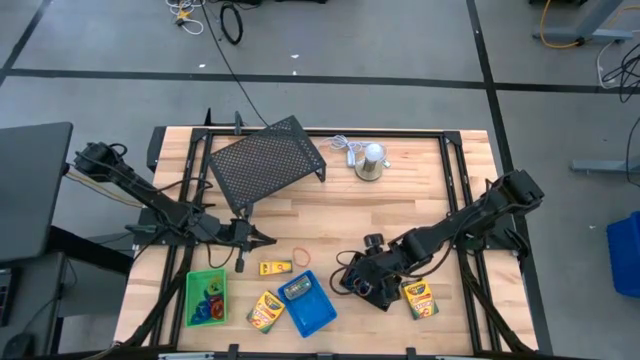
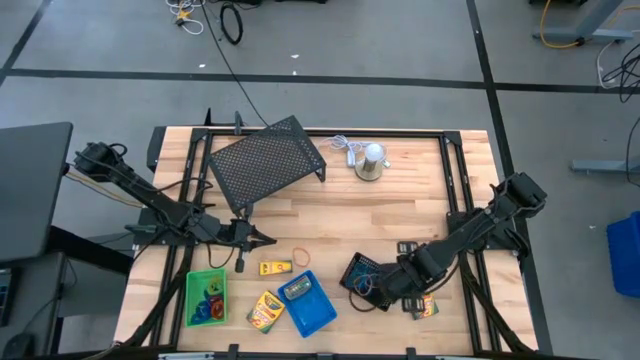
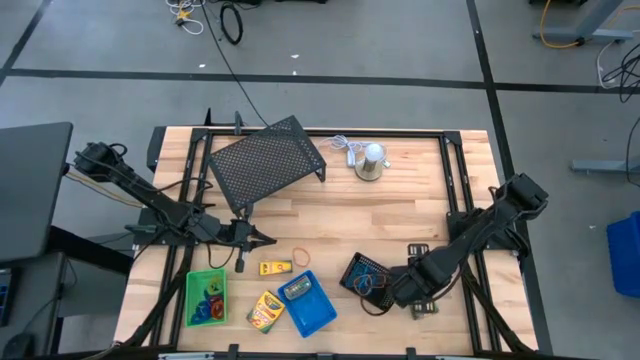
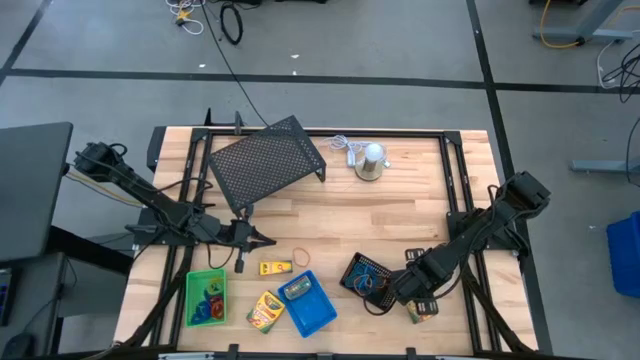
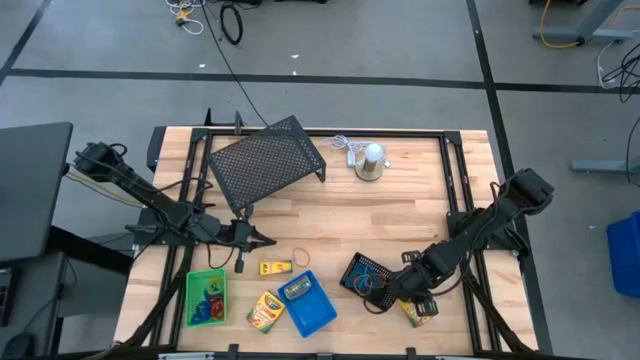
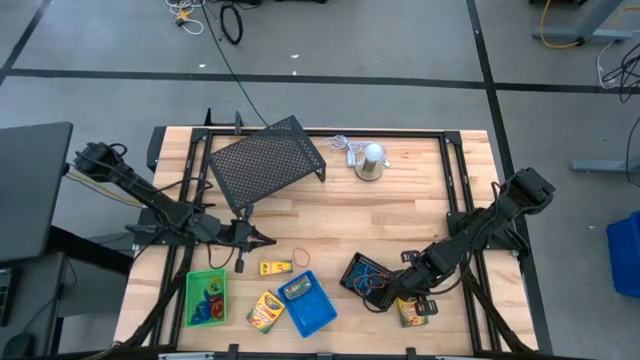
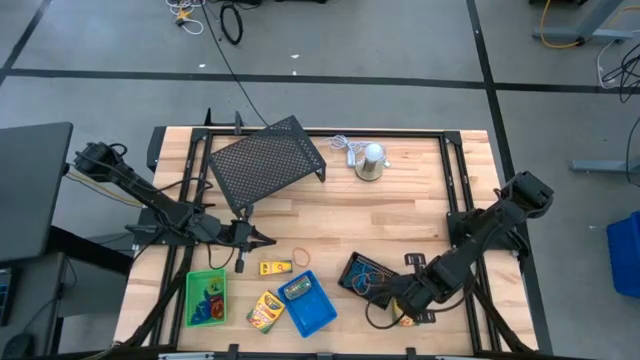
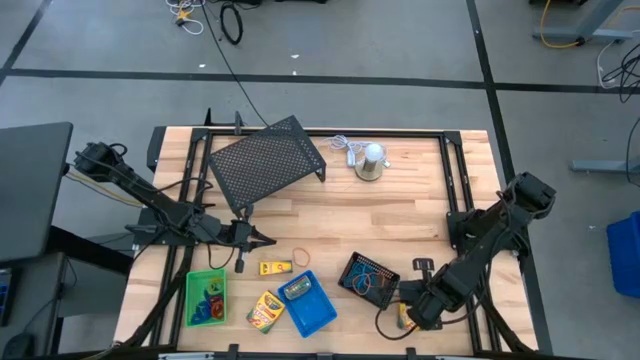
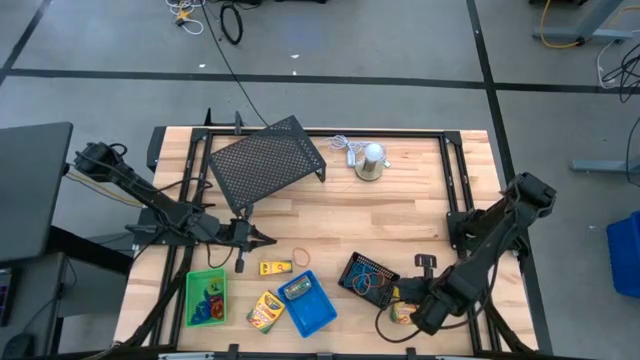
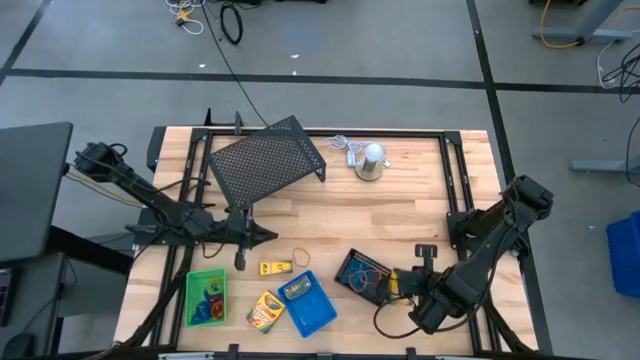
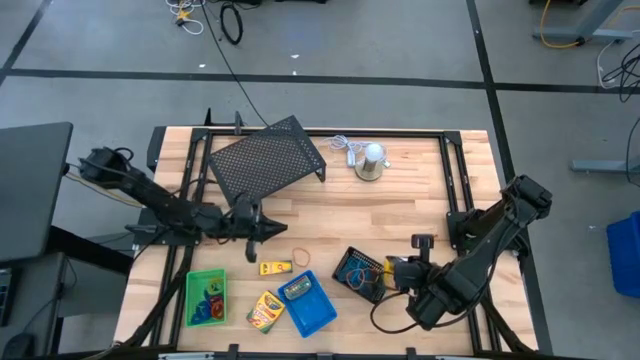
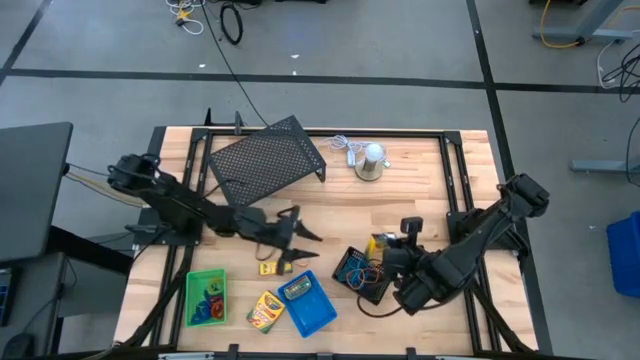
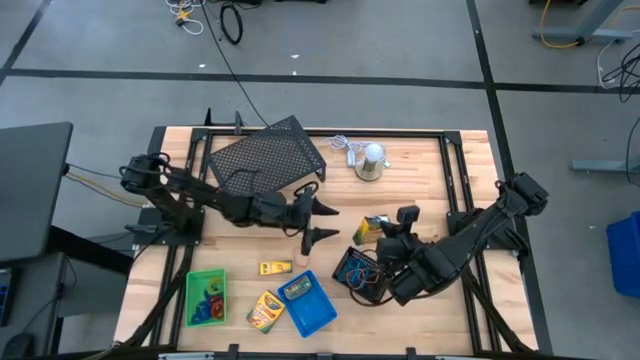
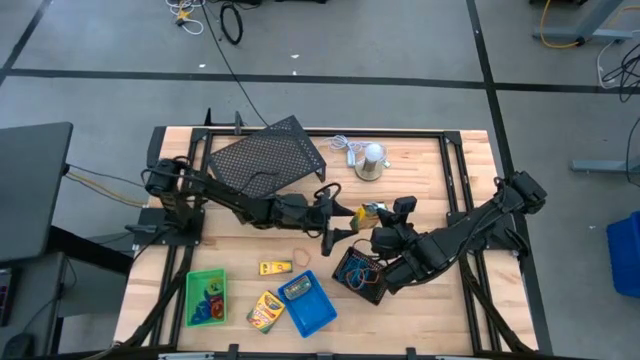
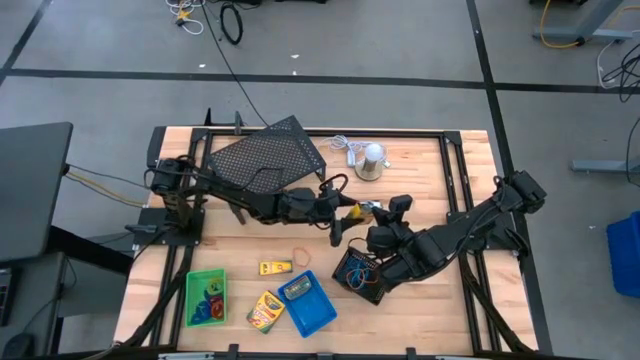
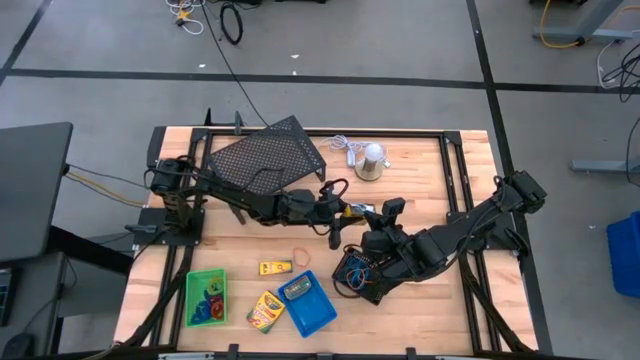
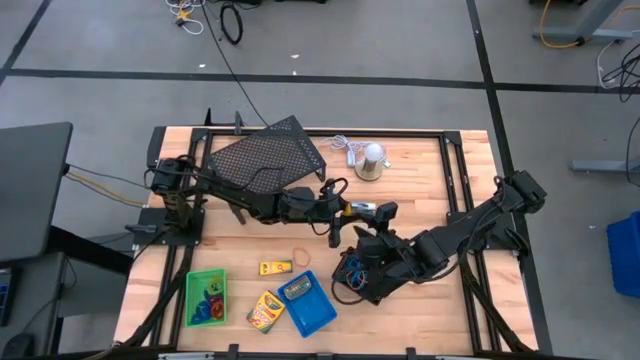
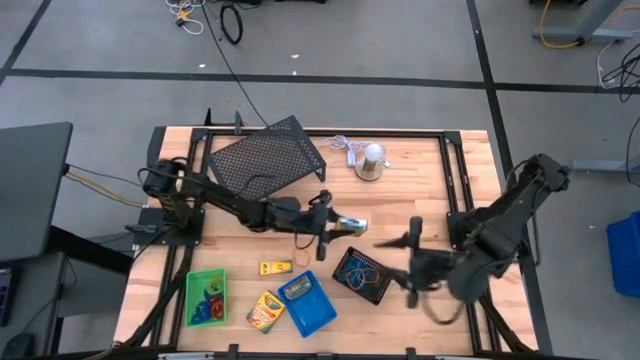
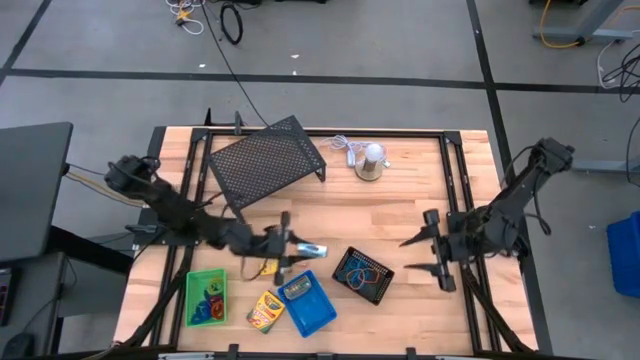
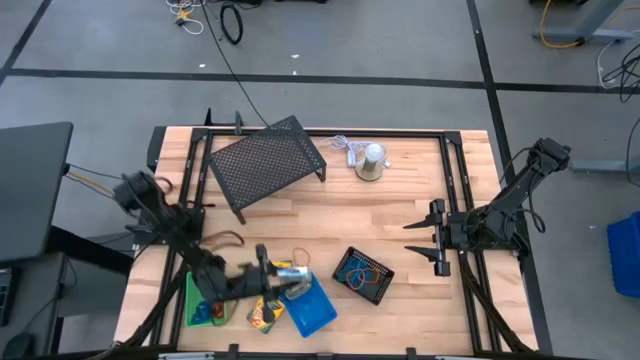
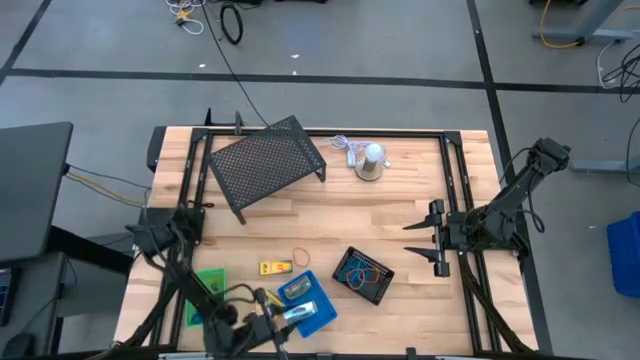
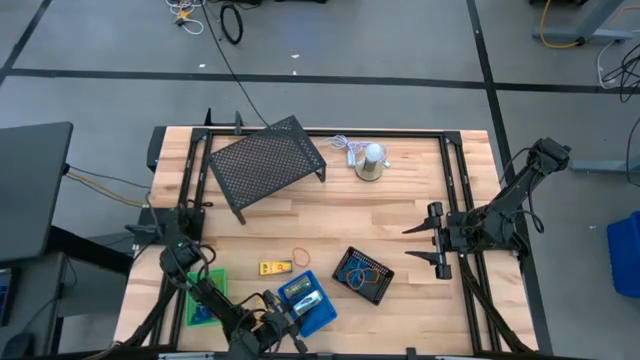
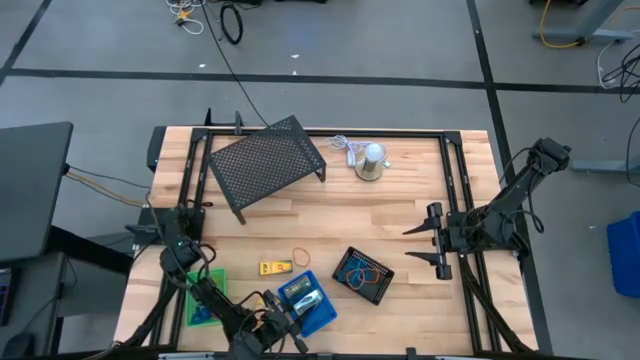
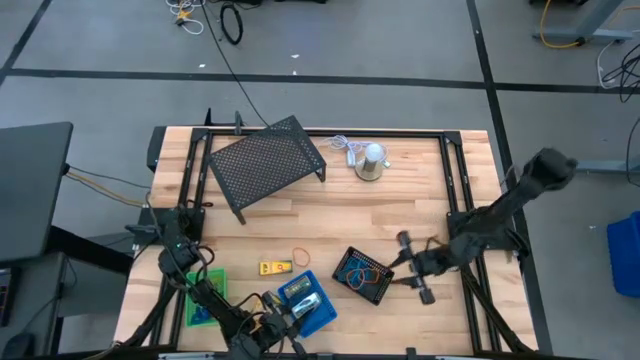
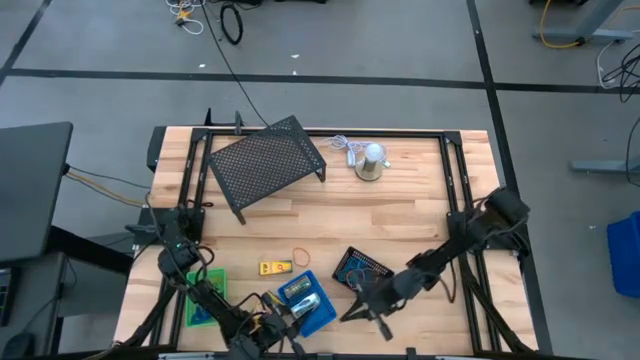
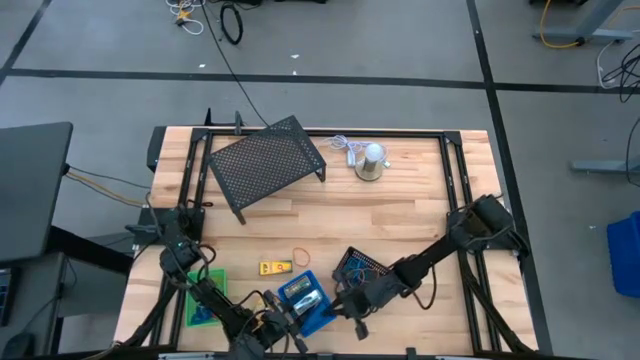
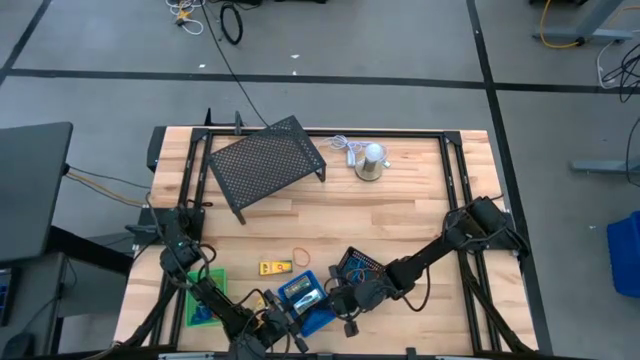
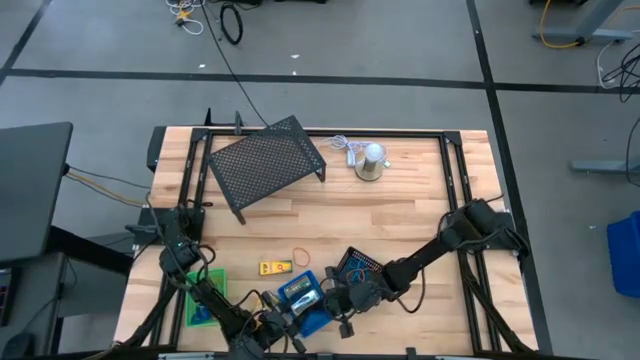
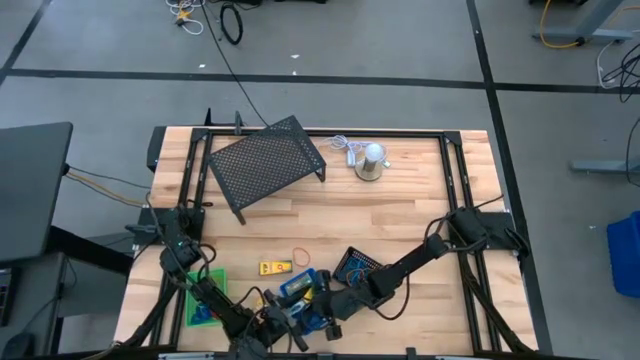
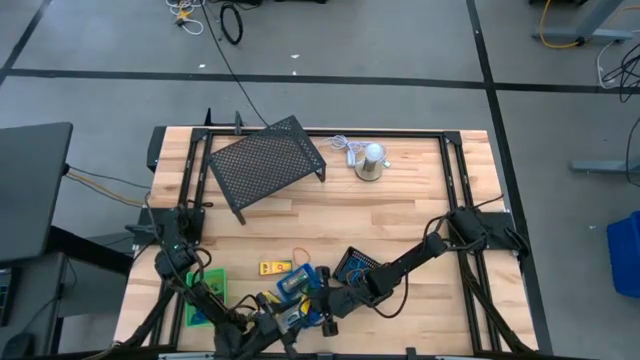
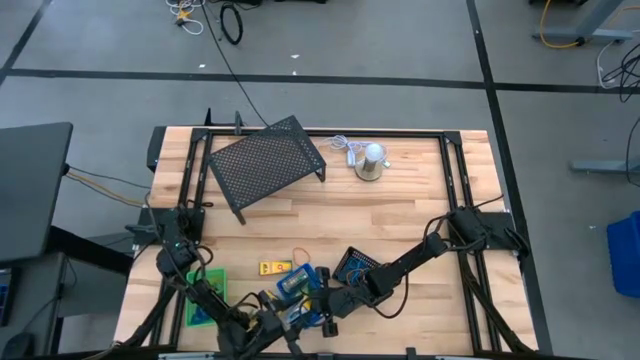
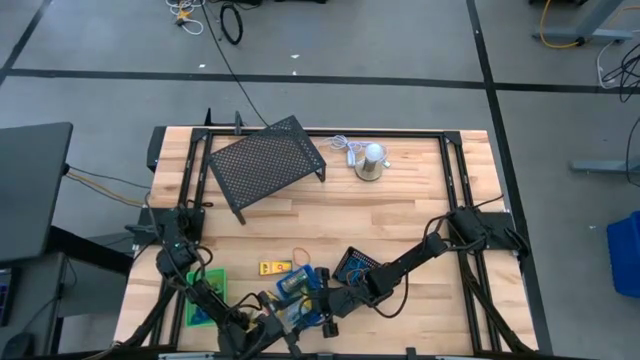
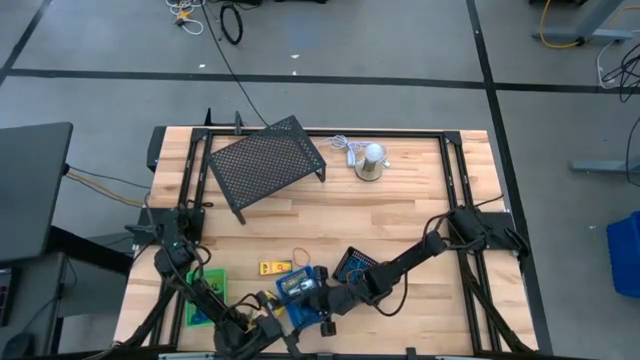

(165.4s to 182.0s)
Task: Pick & Place Office Desk Supplies
Put the yellow crayon box into the blue bin

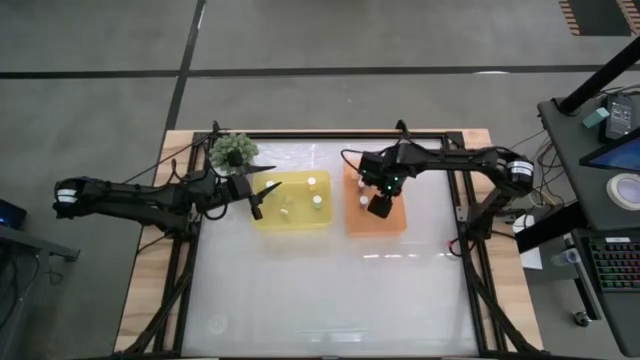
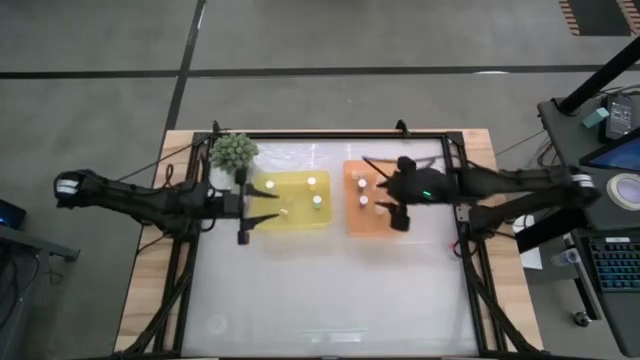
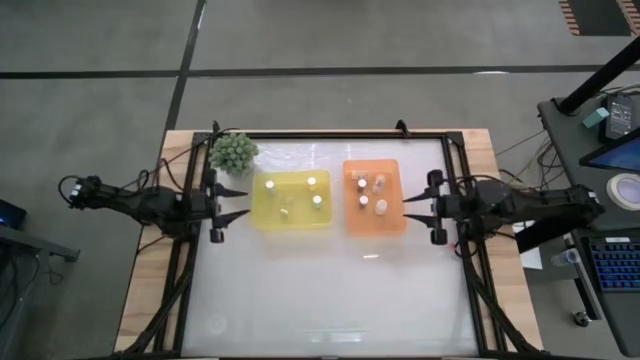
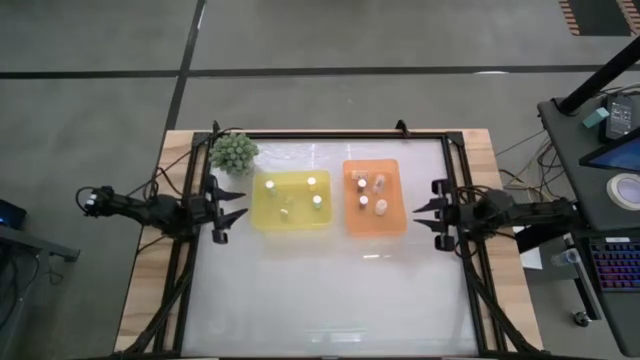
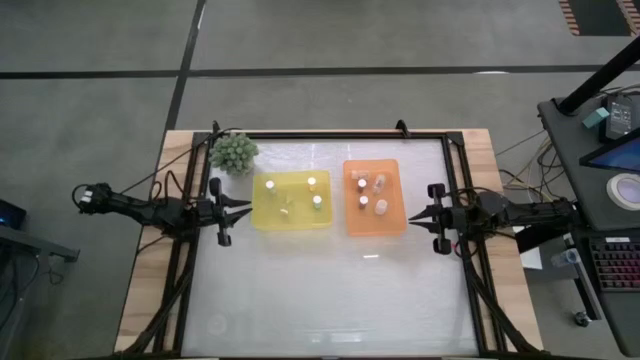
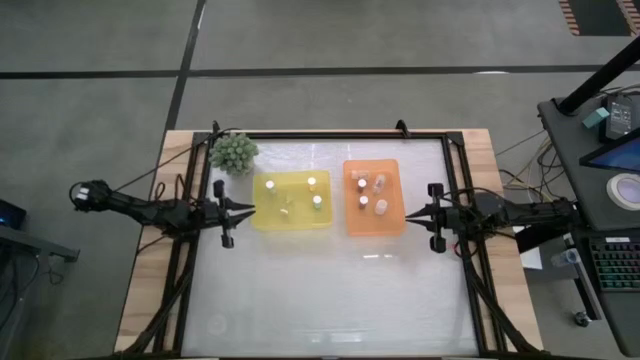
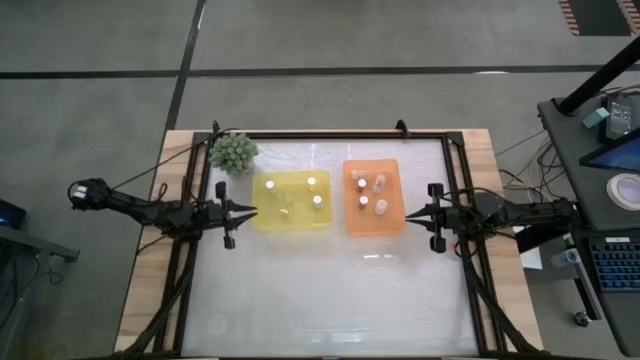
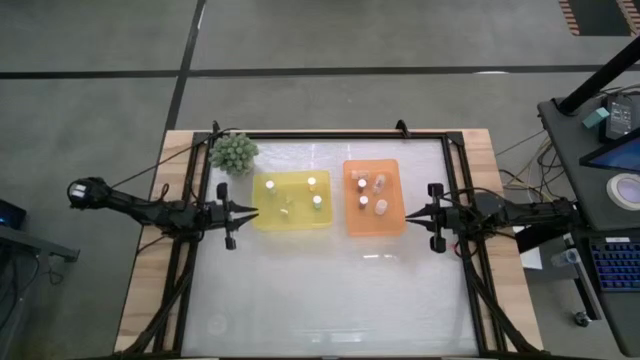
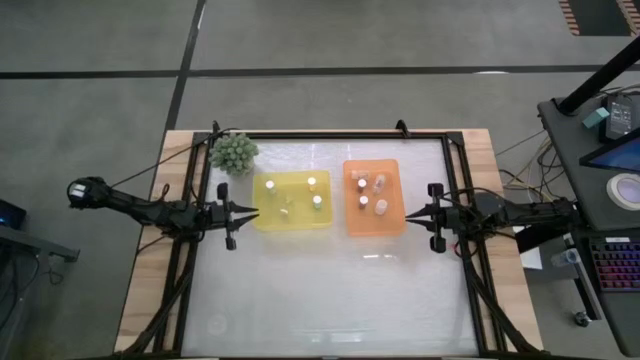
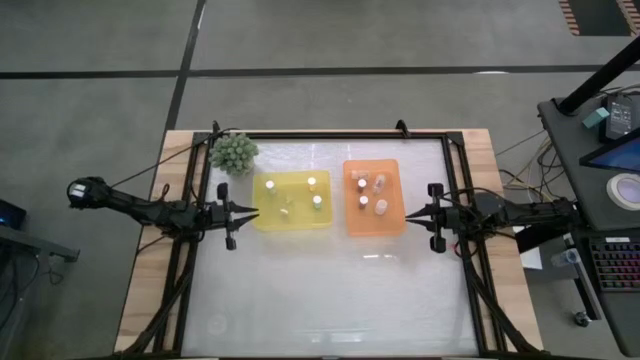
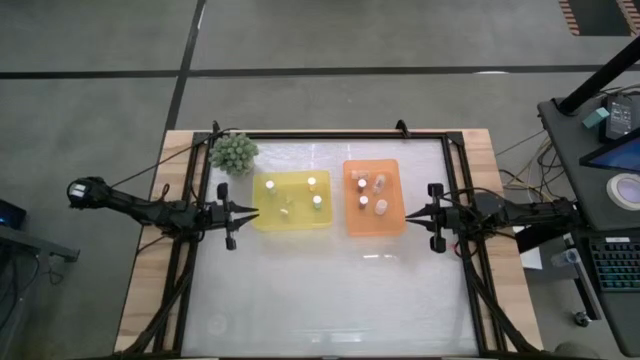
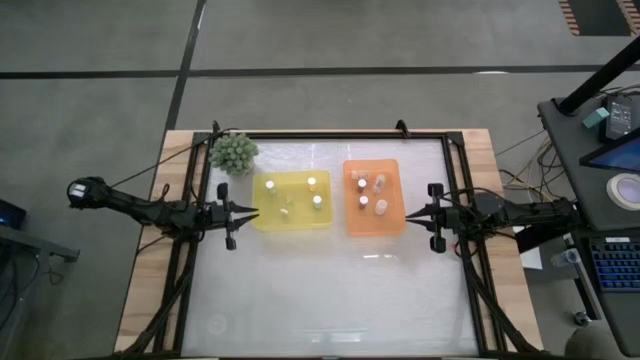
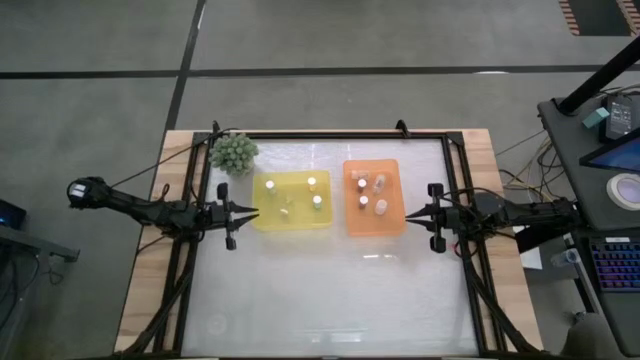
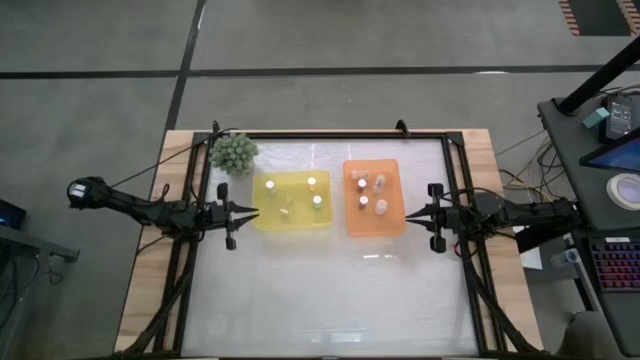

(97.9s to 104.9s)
Task: Pick and place medicine bottles into bin by pill shape (circle, oval)
Return to Home Position
